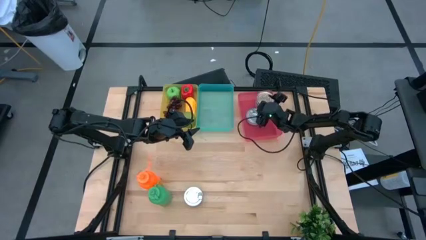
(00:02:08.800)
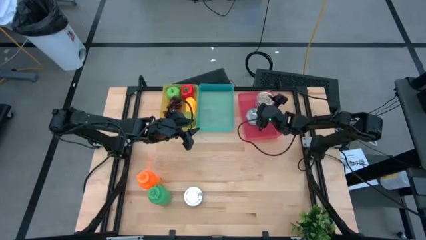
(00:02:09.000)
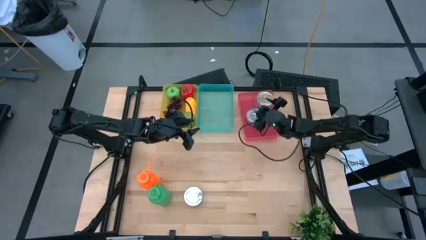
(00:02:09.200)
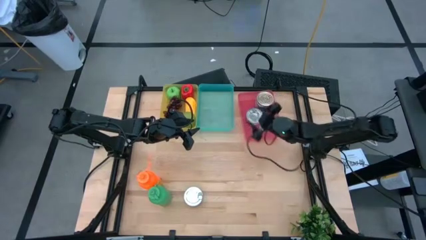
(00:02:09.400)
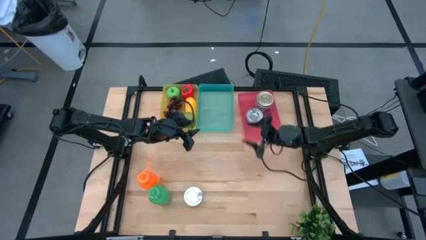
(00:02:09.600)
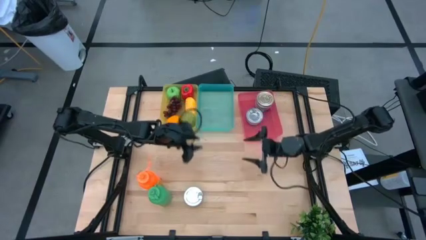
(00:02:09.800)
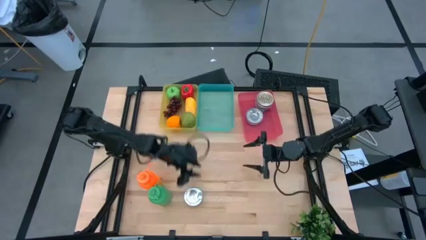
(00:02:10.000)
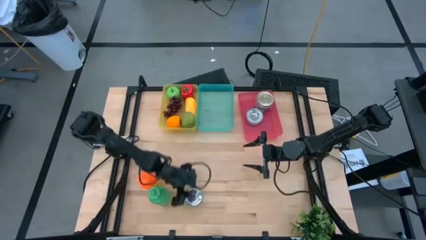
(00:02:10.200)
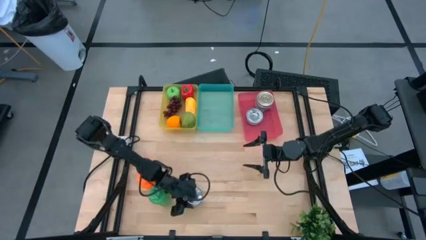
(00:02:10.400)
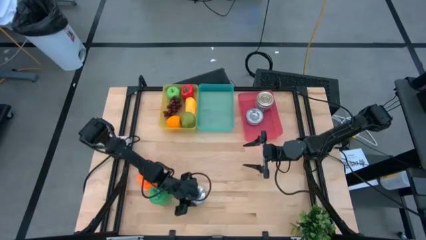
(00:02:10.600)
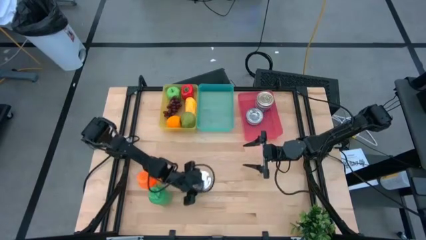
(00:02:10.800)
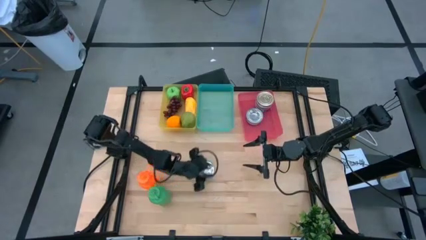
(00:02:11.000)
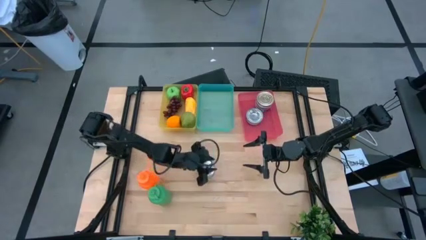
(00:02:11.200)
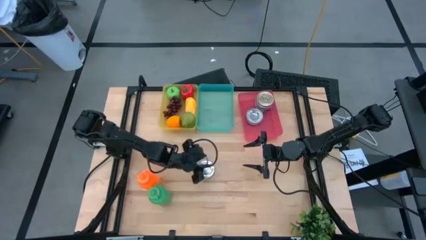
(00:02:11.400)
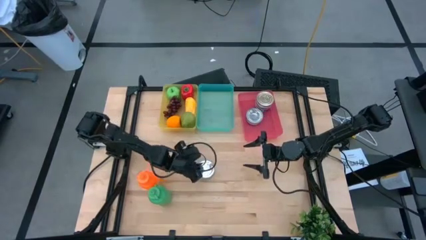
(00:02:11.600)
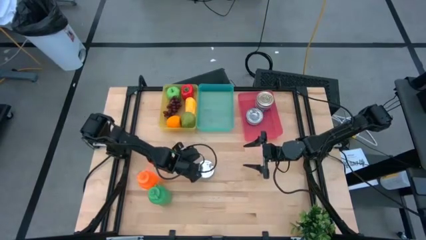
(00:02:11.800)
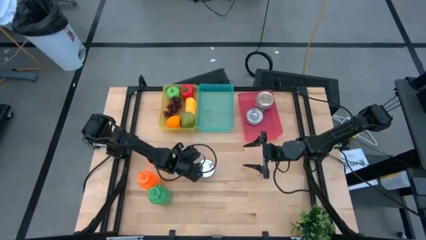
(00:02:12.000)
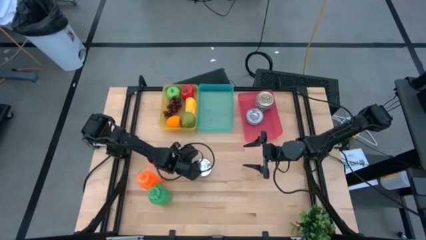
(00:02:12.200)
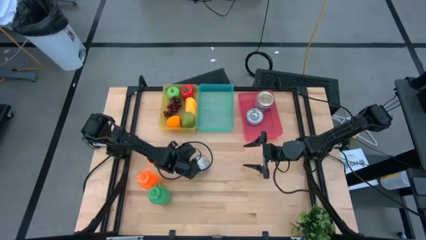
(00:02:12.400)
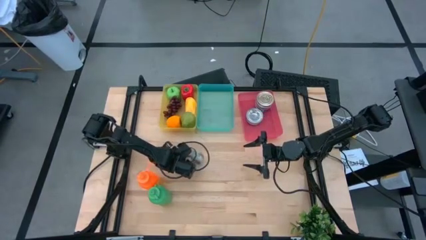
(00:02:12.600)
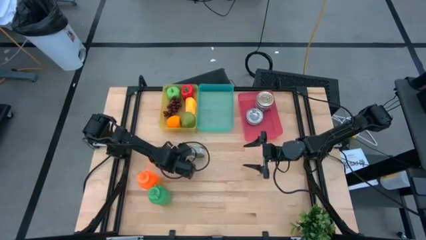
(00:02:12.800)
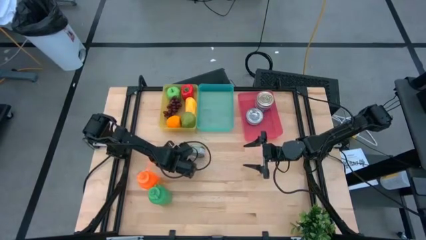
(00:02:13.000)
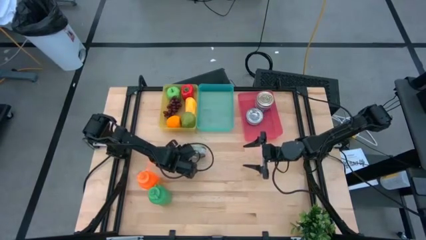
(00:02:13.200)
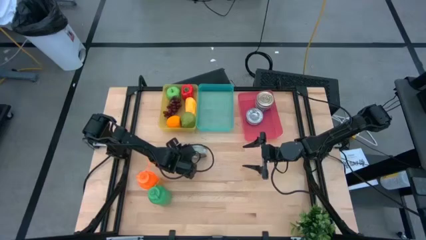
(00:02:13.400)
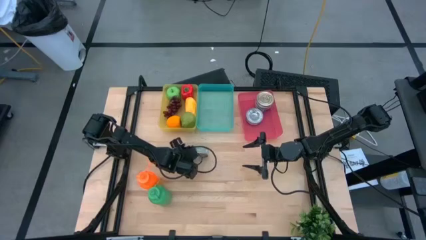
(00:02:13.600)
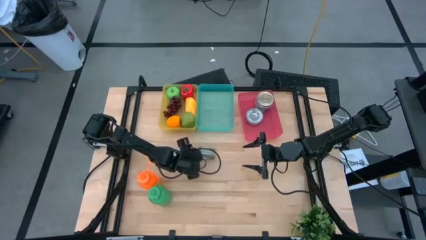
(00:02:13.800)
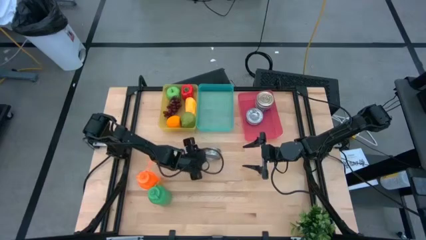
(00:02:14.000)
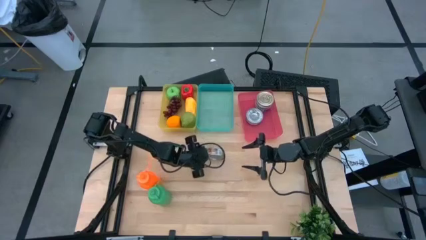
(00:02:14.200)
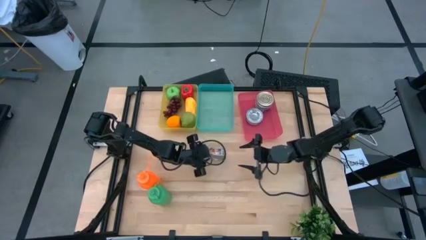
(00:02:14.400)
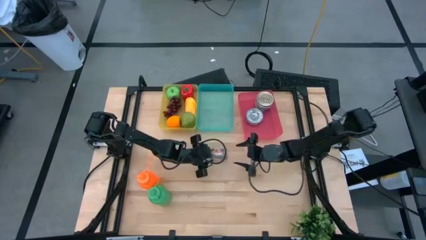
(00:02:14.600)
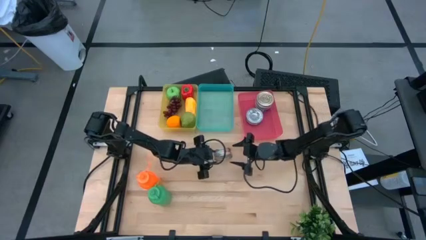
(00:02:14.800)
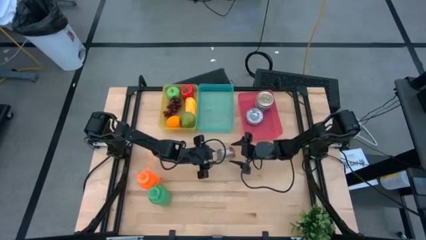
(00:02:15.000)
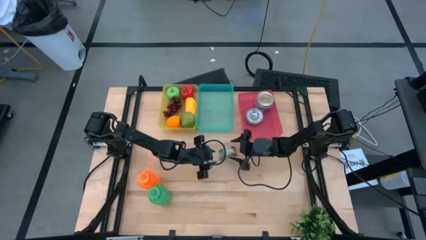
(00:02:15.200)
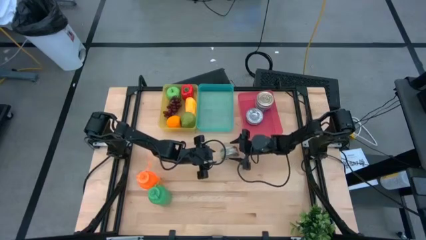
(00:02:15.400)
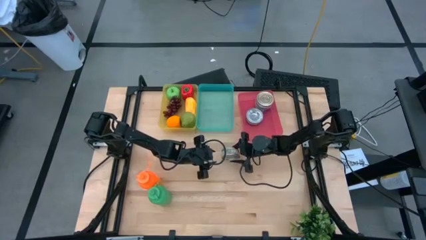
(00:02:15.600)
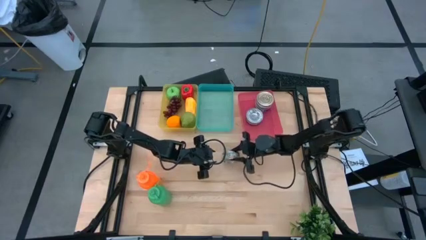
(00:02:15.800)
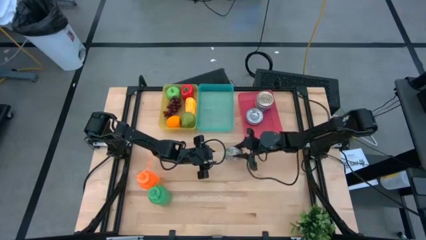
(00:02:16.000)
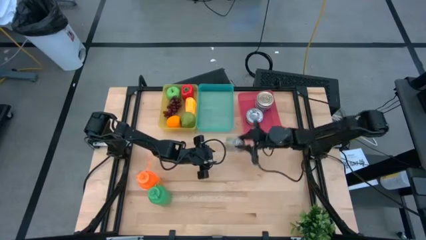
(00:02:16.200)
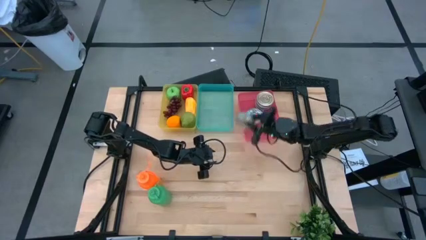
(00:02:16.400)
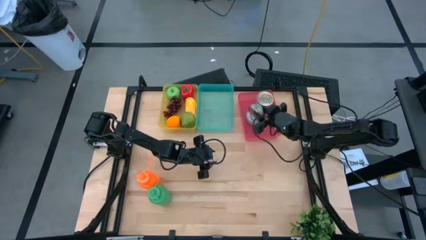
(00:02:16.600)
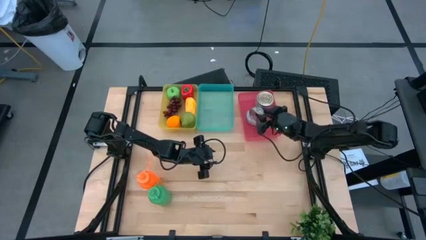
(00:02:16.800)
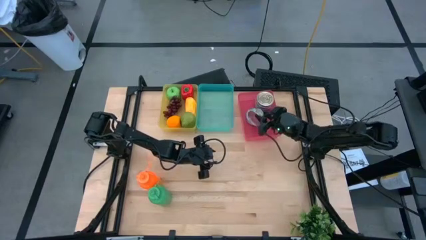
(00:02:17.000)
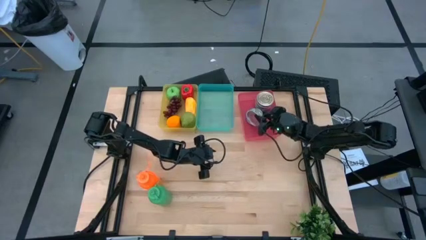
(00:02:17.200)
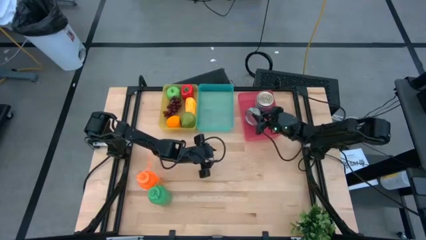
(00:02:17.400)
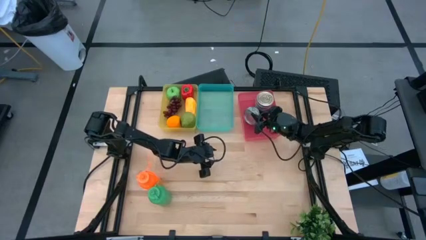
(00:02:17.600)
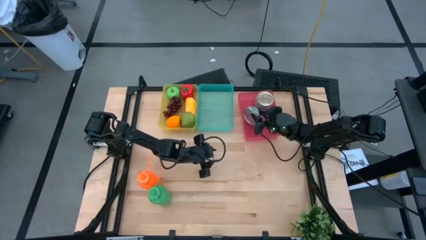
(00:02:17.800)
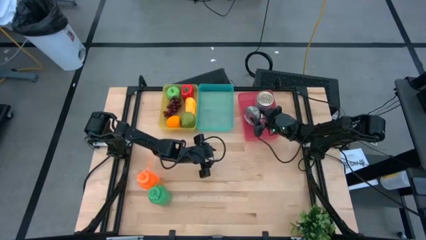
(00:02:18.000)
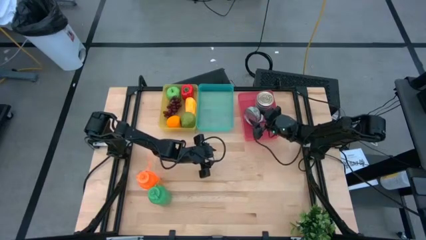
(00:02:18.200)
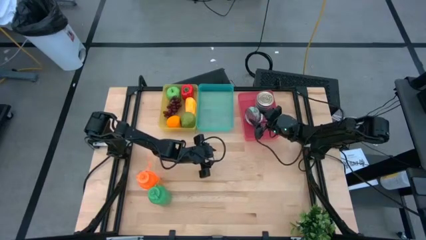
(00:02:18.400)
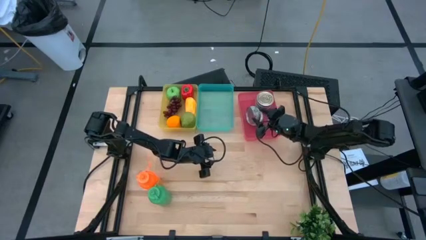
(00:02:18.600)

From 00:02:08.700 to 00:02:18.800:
Task: Pick & Place Food Item
Put the green tuna can into the red bin
